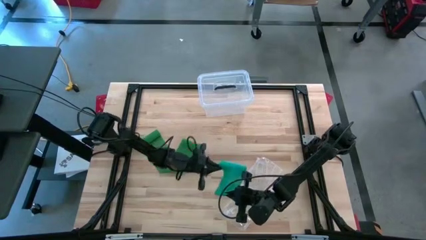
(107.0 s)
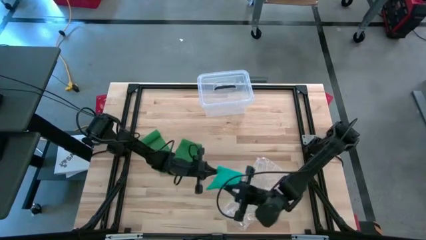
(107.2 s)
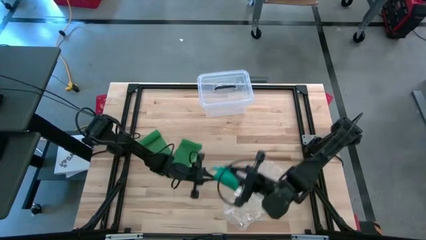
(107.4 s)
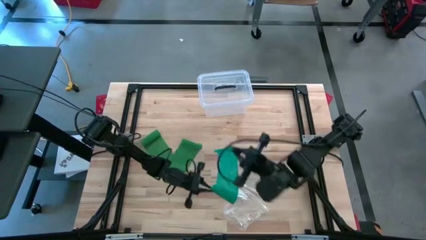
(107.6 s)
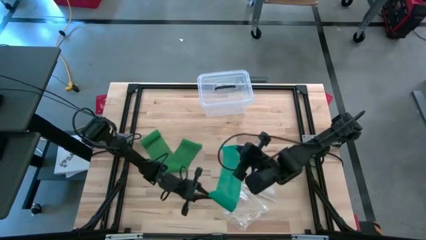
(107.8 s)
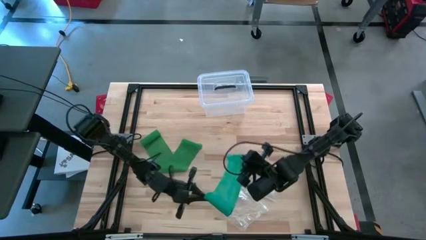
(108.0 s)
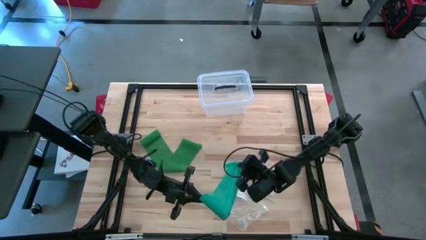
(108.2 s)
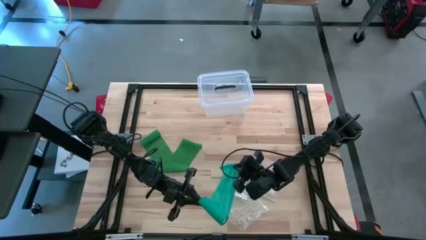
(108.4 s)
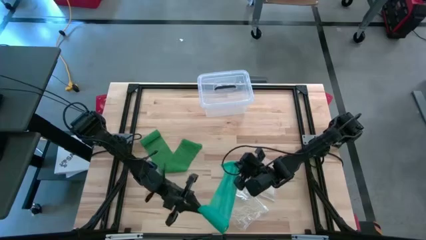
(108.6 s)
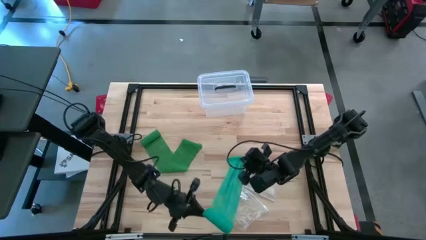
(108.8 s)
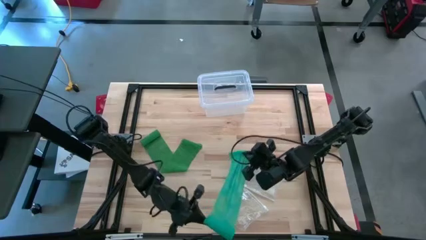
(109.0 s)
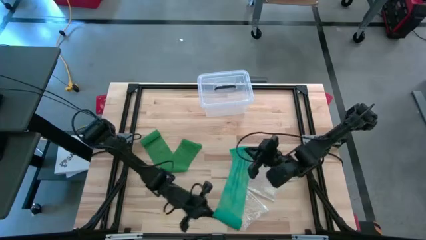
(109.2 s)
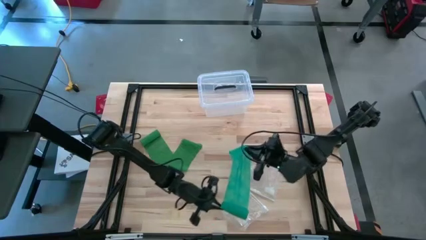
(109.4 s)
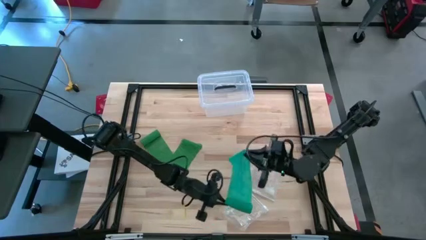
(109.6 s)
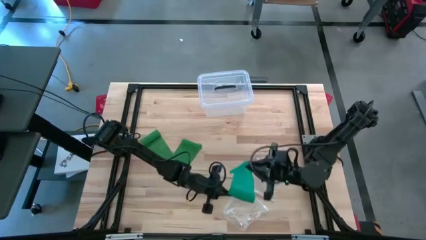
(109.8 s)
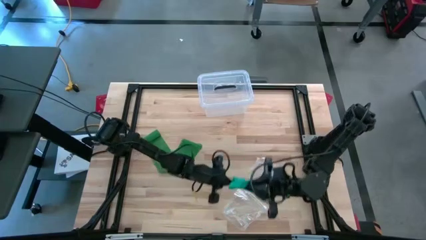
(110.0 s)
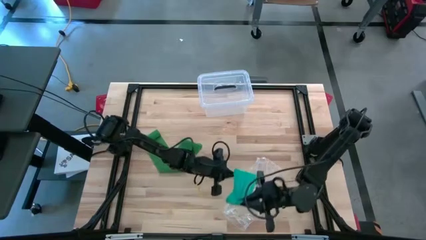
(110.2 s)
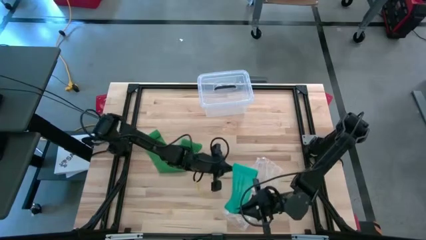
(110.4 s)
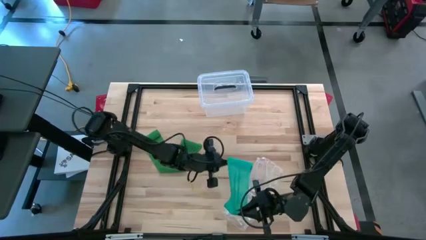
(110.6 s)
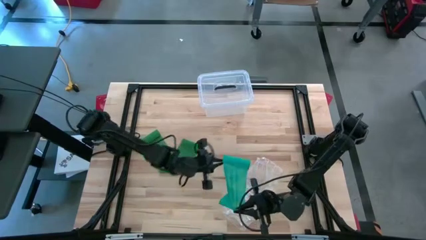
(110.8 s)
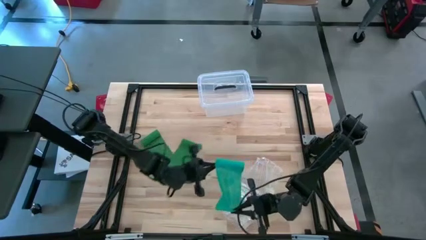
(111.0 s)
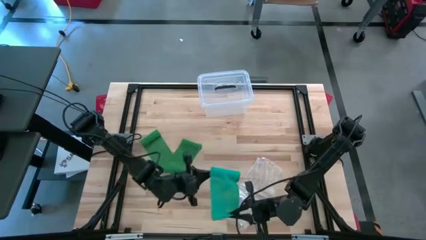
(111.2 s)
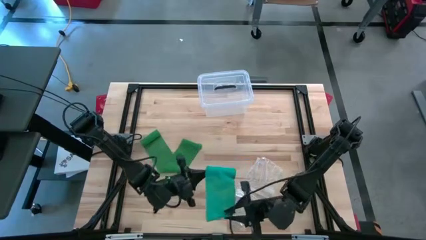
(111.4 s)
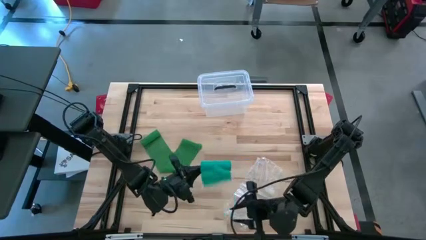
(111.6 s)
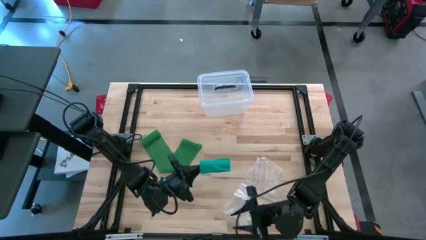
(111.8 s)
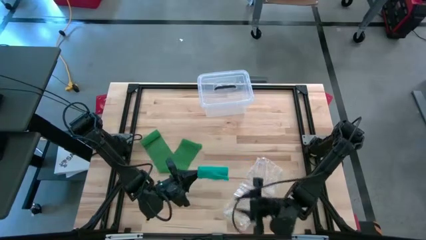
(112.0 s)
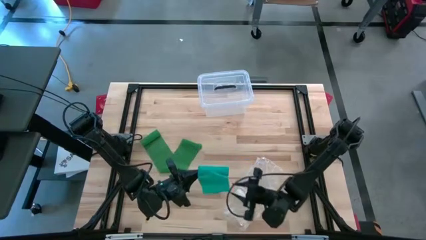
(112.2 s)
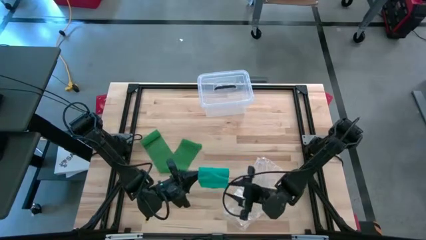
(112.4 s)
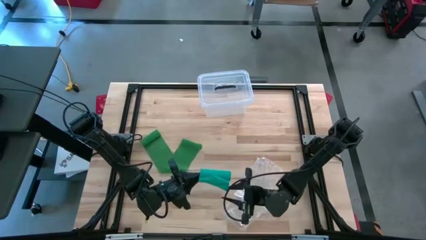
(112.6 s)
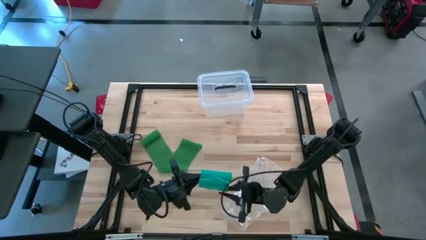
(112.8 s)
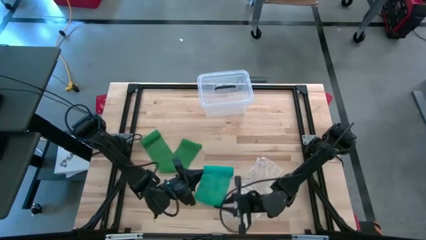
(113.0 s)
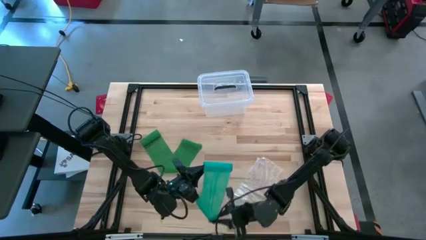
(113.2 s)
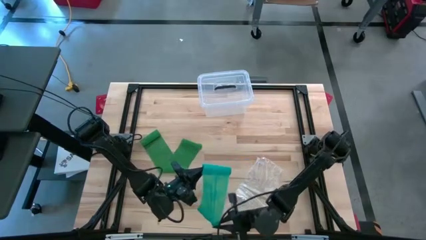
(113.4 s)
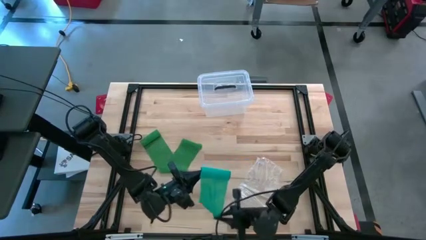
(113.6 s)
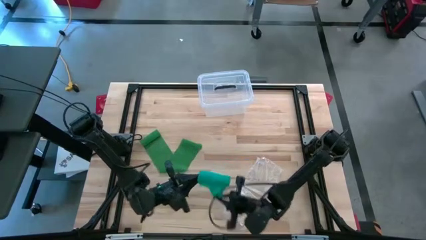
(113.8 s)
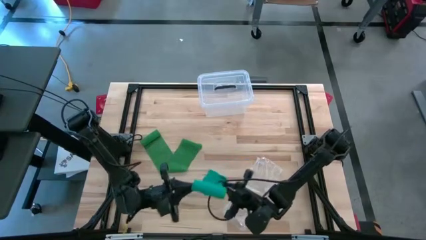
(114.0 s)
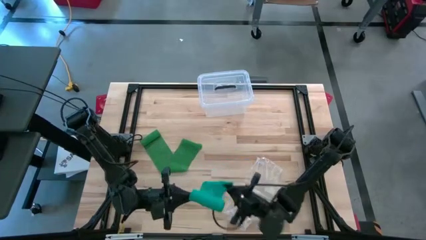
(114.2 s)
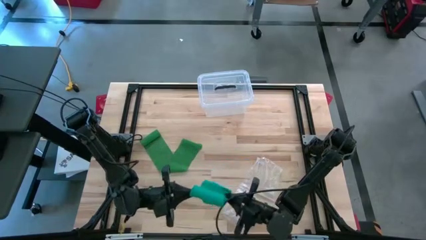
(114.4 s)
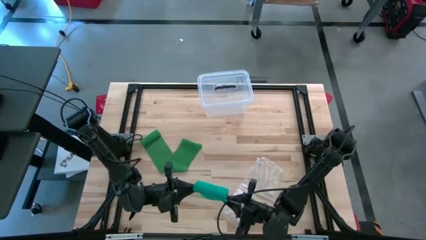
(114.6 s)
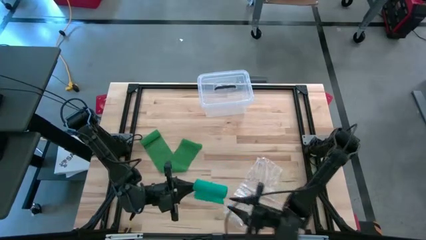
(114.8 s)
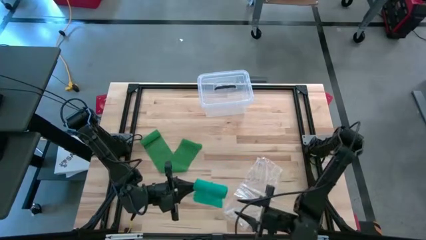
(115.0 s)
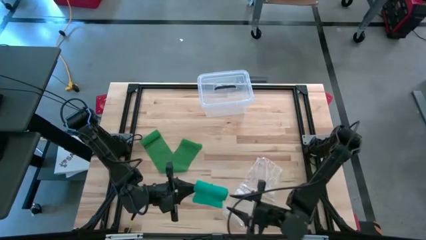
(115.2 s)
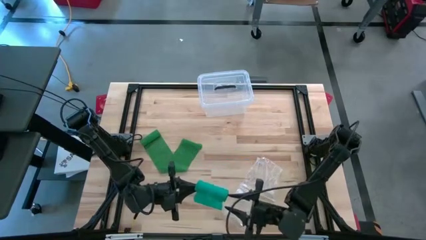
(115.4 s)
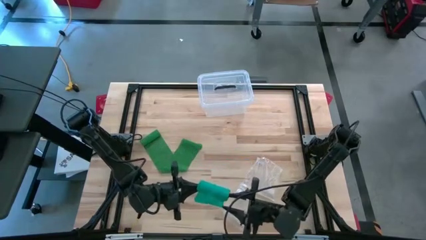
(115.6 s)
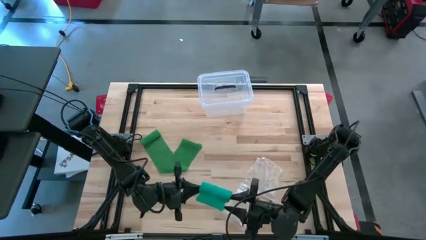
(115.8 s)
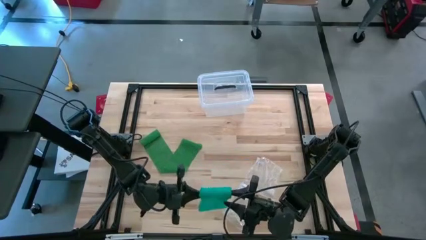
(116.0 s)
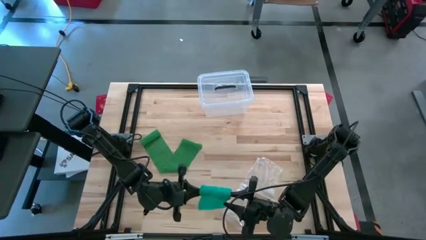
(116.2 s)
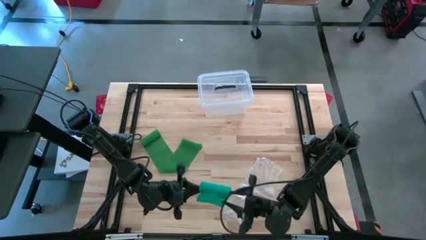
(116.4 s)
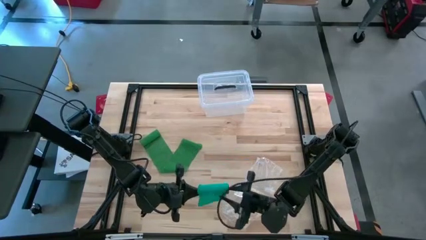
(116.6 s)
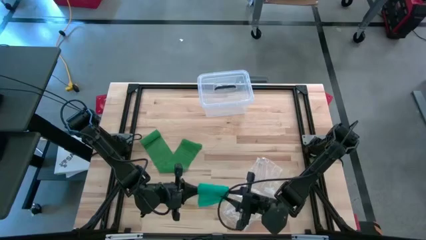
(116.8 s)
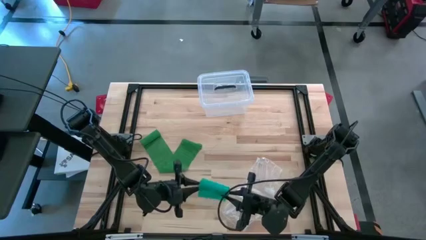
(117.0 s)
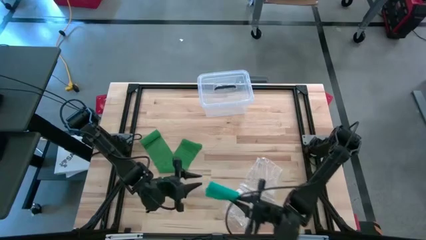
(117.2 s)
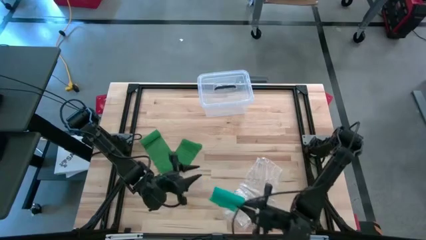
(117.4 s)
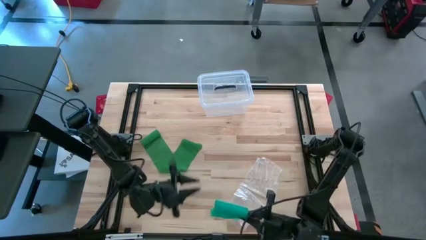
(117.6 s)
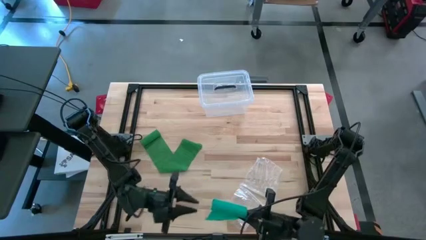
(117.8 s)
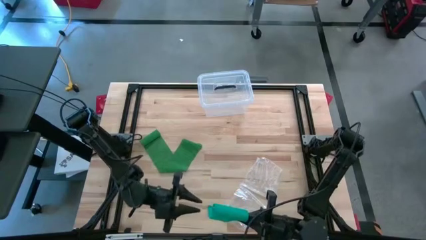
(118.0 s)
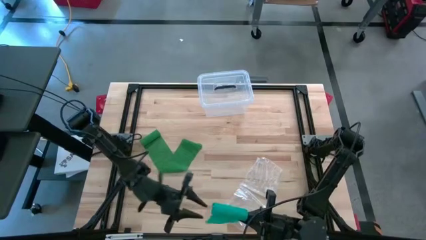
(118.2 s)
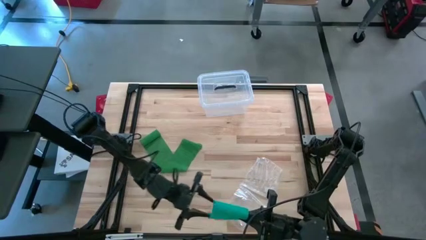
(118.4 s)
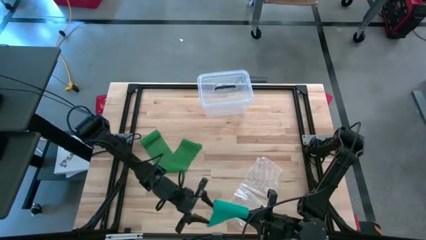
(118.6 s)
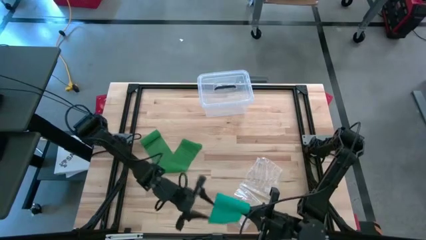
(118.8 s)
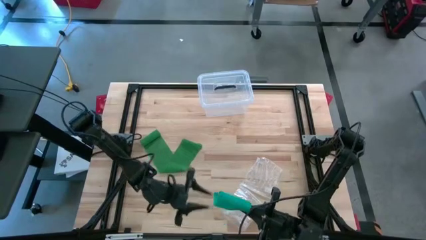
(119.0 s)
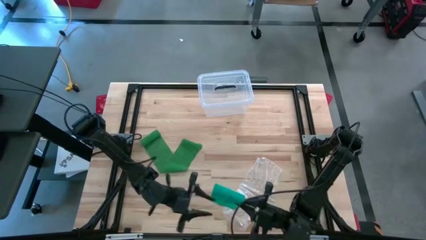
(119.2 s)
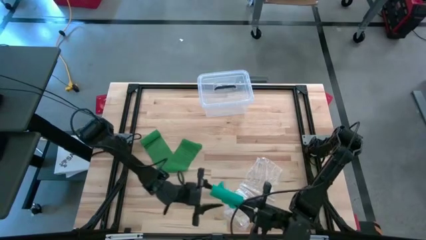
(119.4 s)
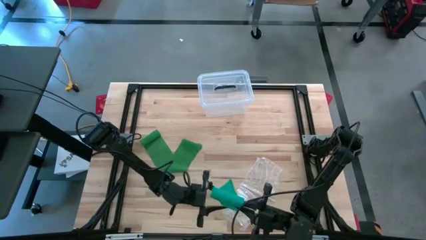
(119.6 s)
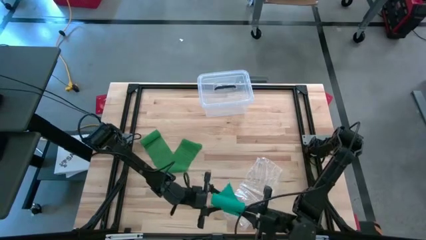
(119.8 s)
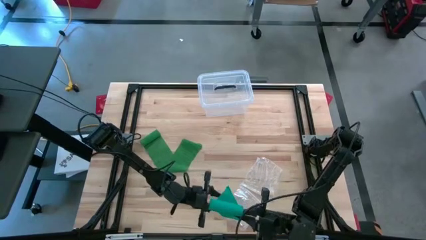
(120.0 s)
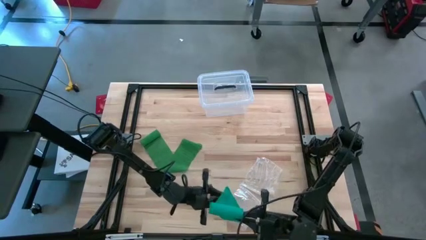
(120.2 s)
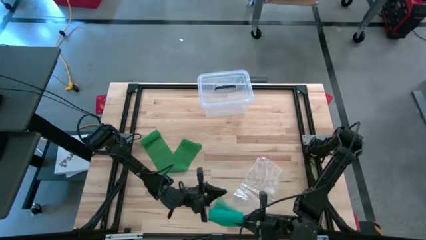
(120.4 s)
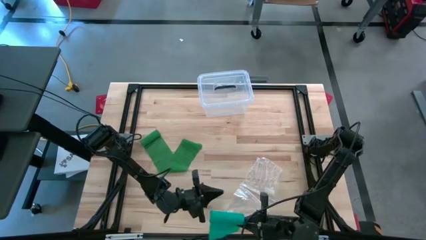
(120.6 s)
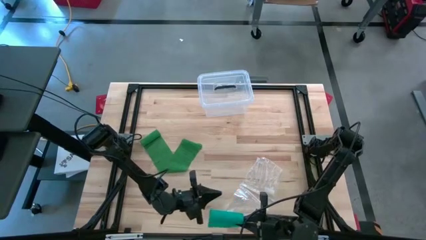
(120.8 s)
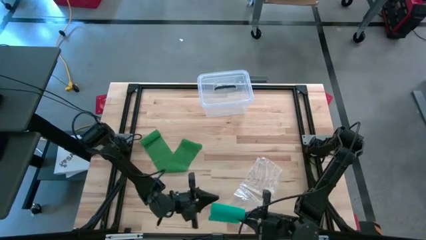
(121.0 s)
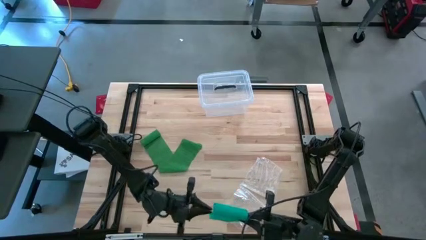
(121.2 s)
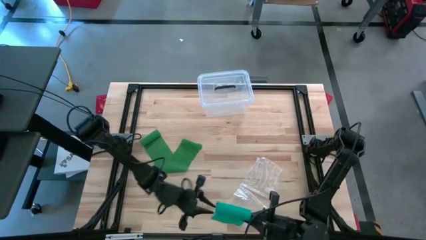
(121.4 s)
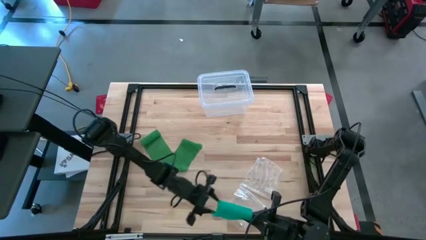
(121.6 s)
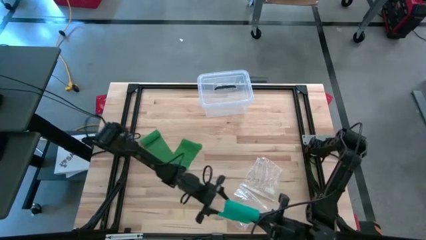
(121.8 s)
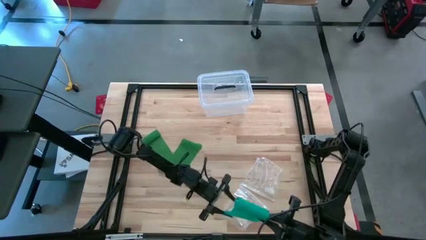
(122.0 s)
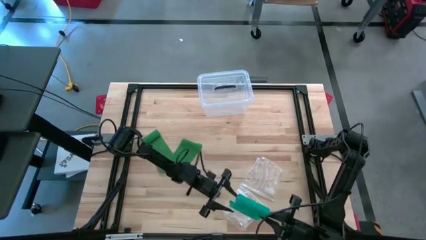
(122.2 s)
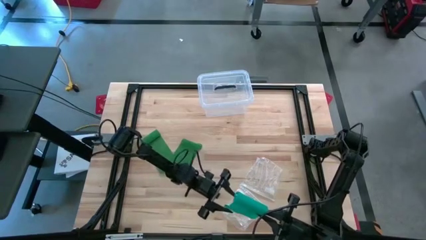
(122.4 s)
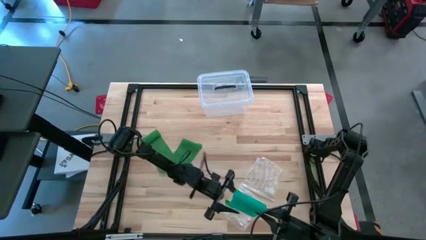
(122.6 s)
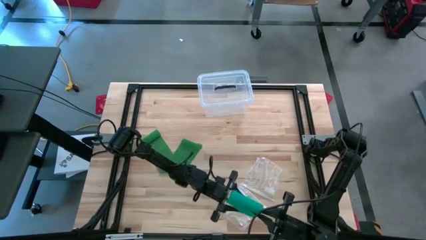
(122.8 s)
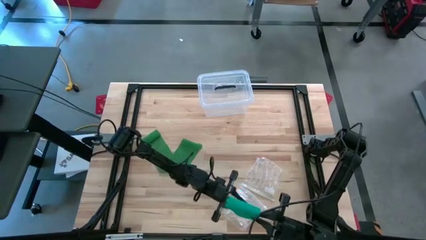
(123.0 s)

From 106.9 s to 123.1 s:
Task: Roll bandage
Roll the blue bandage
